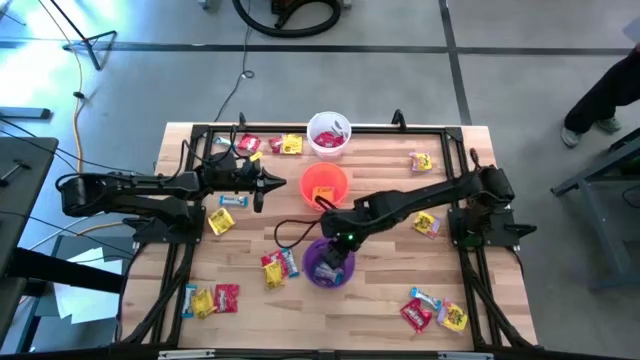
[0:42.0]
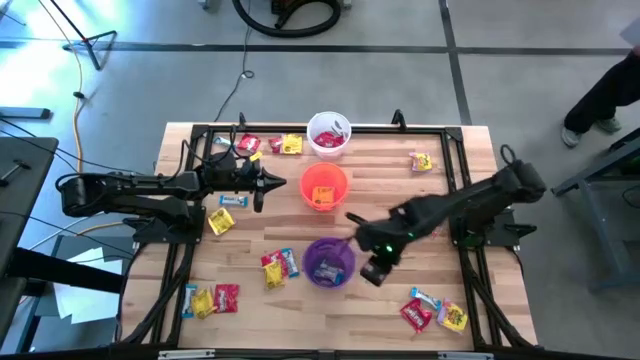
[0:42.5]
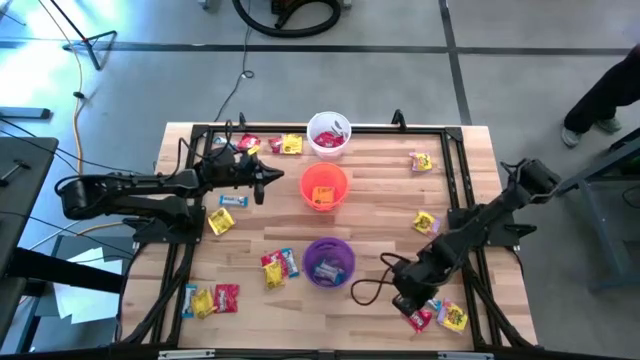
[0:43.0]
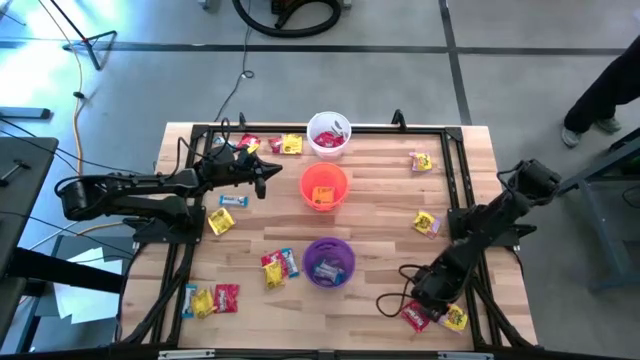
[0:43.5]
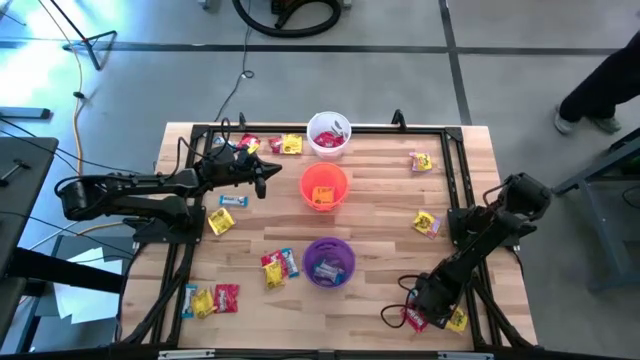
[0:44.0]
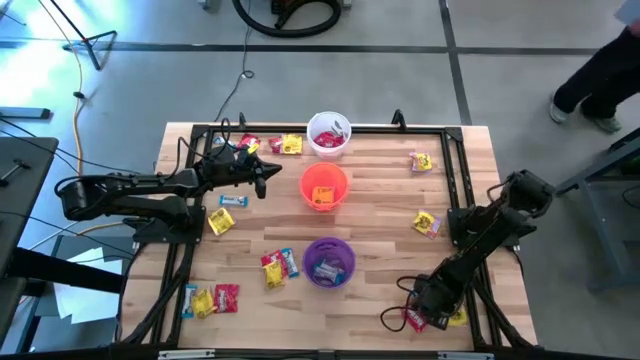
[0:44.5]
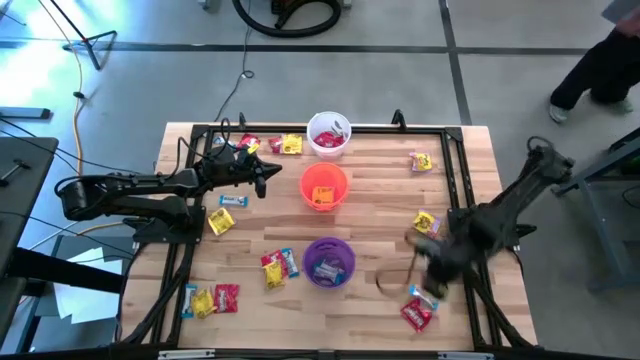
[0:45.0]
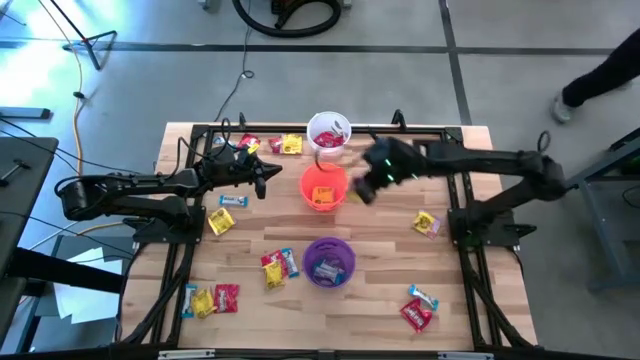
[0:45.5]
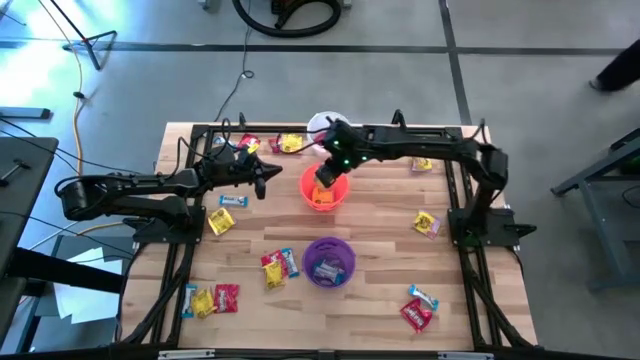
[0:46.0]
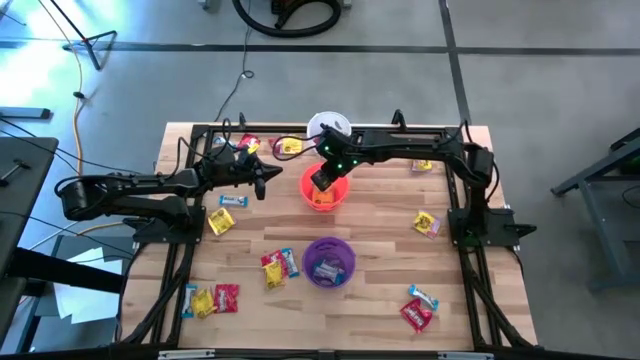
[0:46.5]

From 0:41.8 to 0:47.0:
Task: Sort candy
Put the yellow candy into the orange bucket

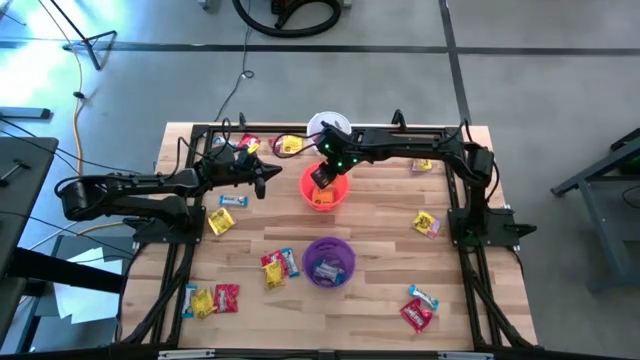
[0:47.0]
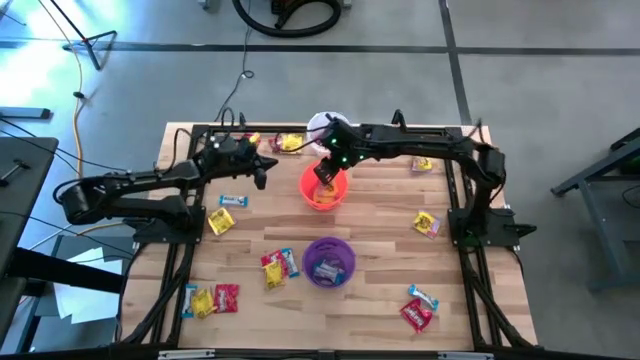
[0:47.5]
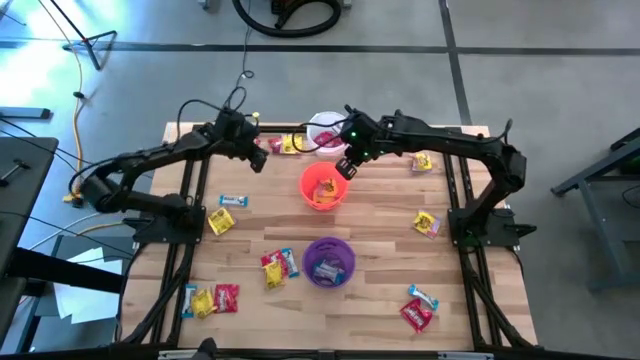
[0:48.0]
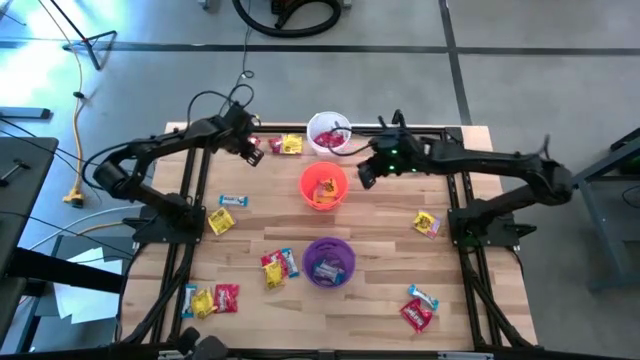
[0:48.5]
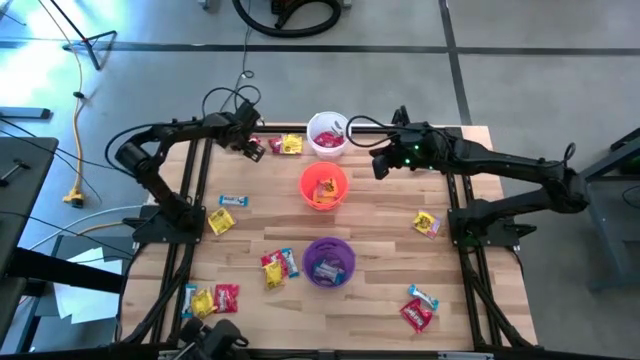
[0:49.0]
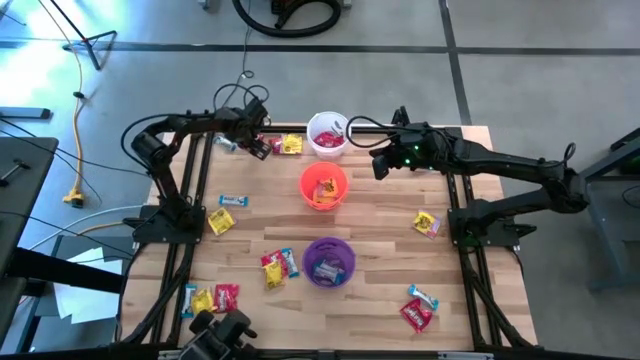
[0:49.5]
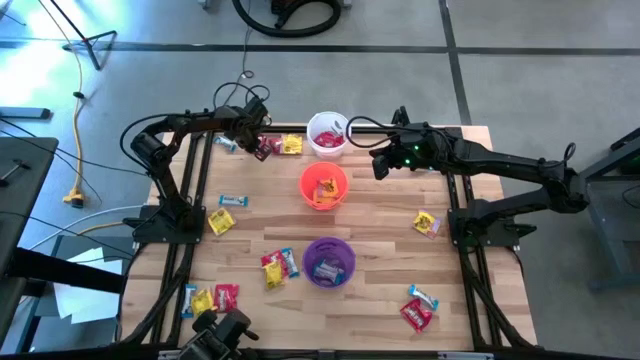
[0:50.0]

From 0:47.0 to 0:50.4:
Put the red candy into the white bucket

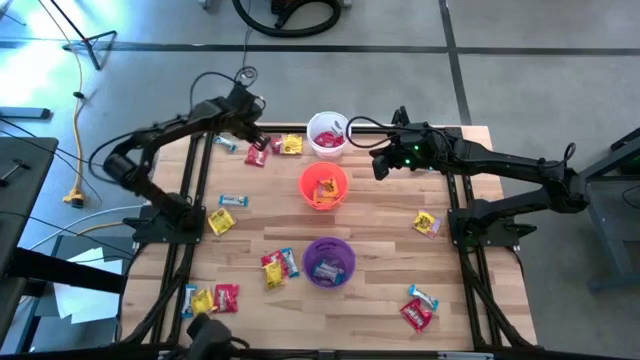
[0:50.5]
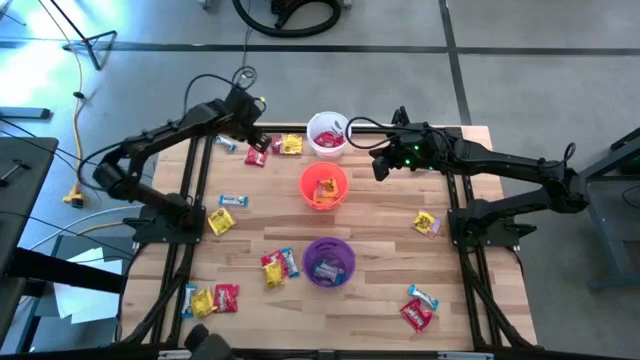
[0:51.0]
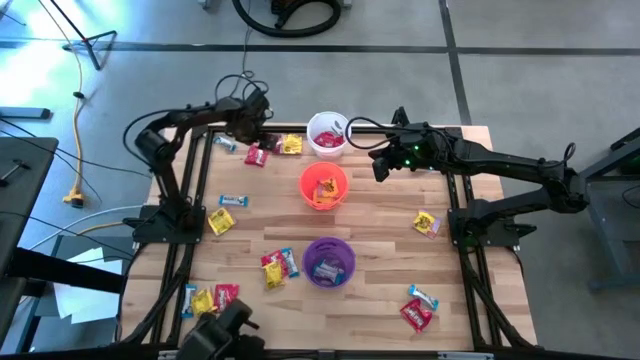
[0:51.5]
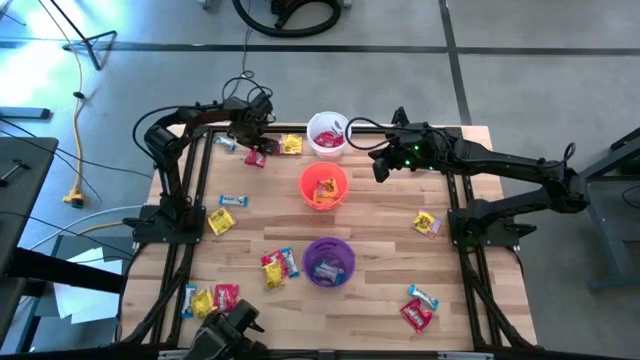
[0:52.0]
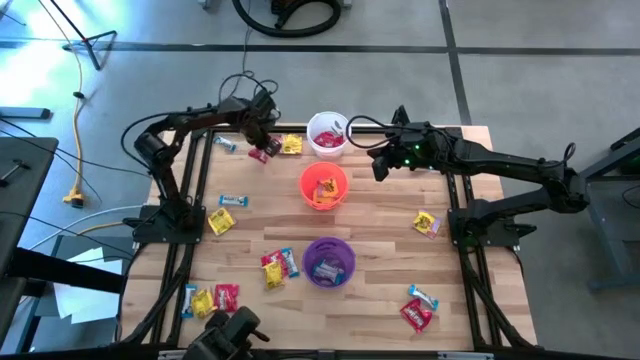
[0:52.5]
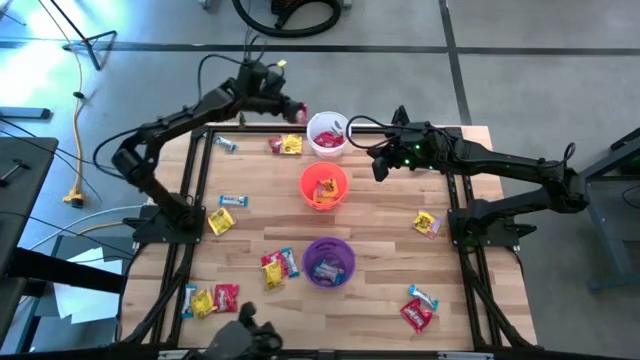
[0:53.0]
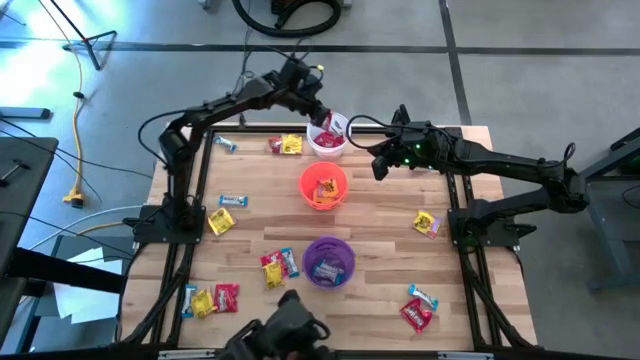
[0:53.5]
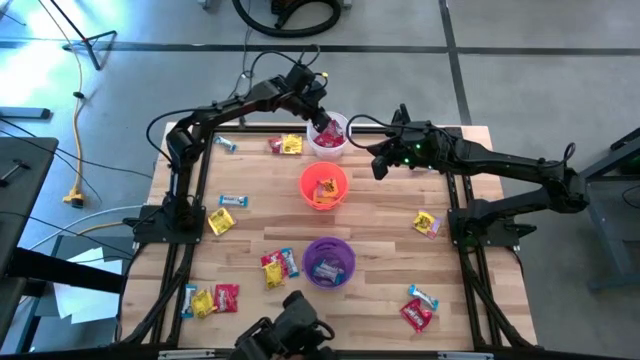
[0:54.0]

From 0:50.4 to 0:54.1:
Put the red chocolate into the white bucket

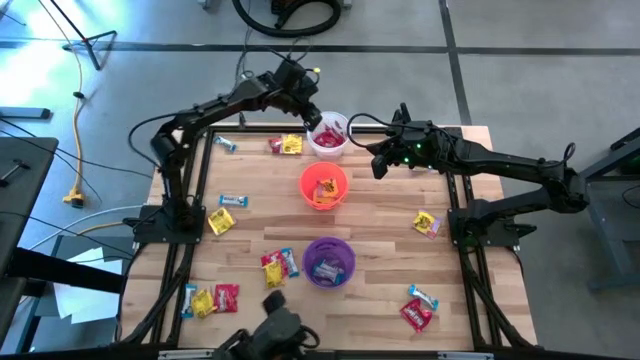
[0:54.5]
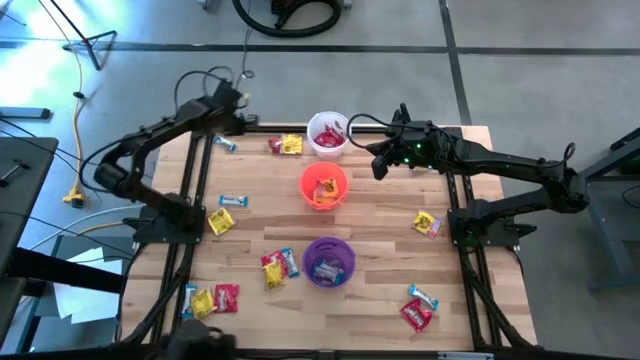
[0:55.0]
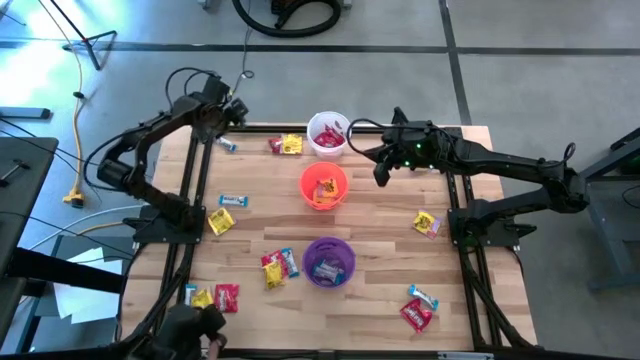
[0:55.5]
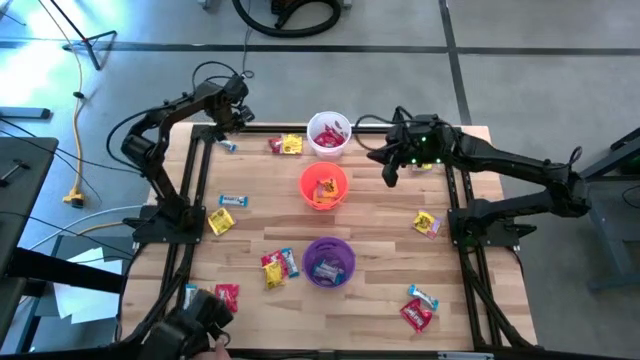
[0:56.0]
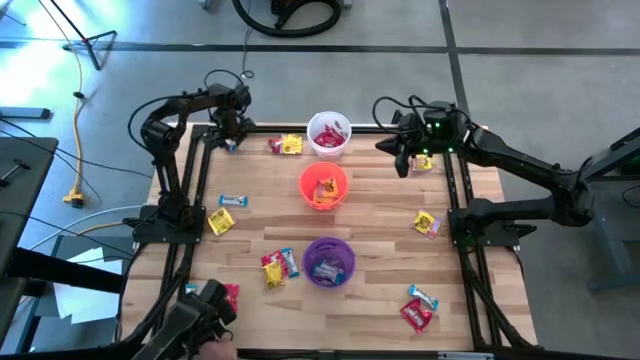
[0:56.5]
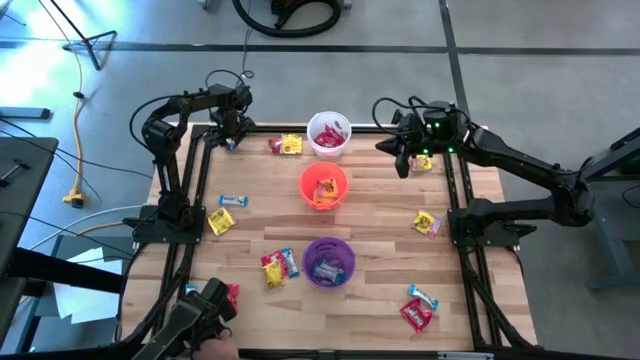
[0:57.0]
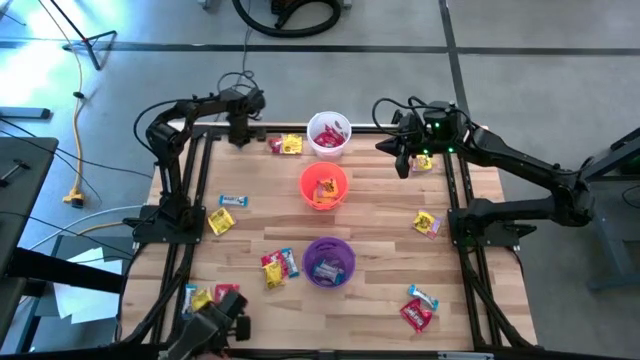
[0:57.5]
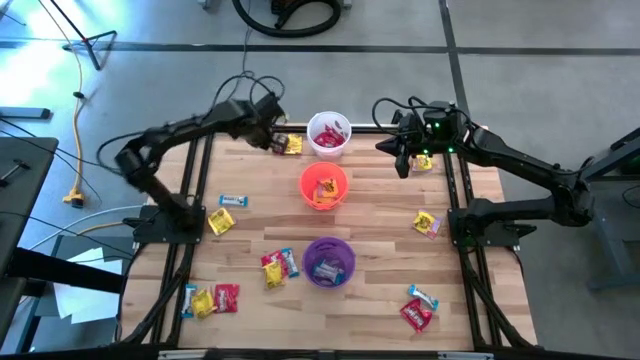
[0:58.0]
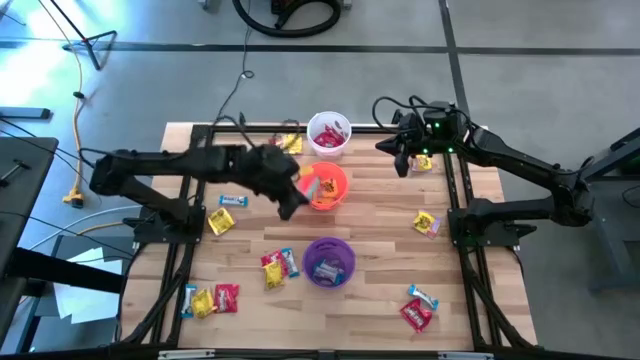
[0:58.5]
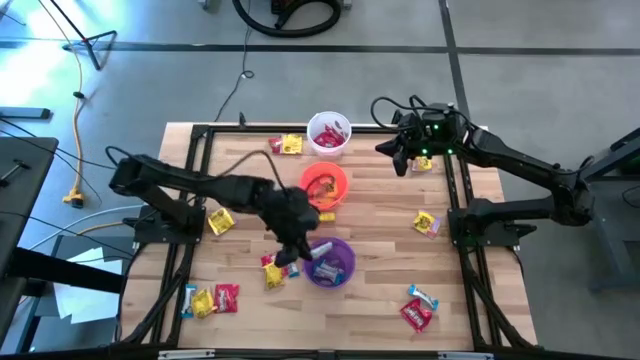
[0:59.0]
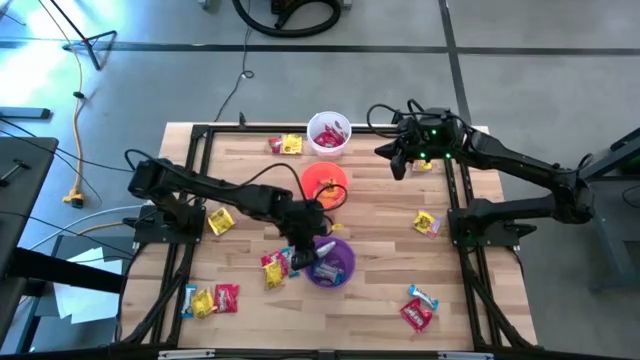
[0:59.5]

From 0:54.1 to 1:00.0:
Put the white chocolate into the violet bucket

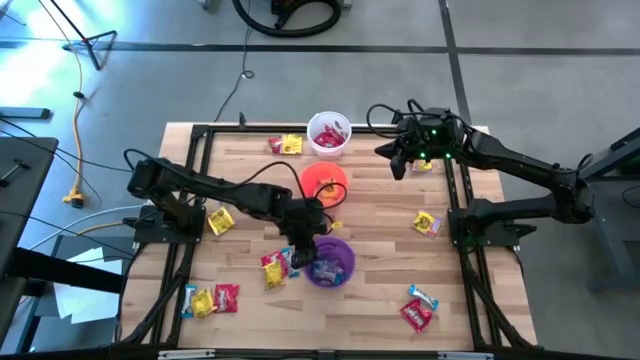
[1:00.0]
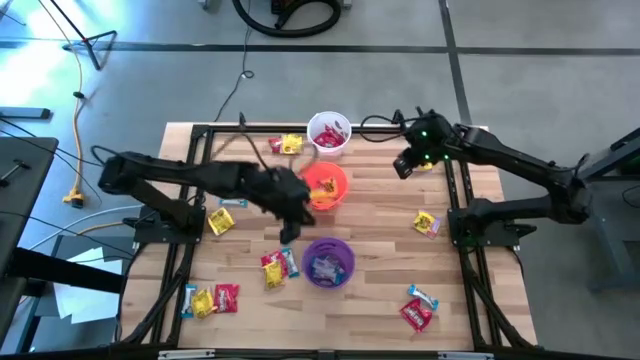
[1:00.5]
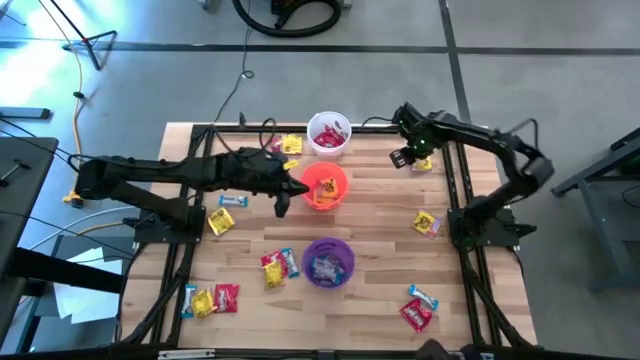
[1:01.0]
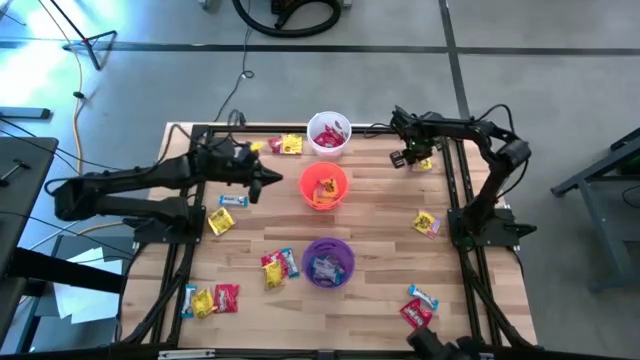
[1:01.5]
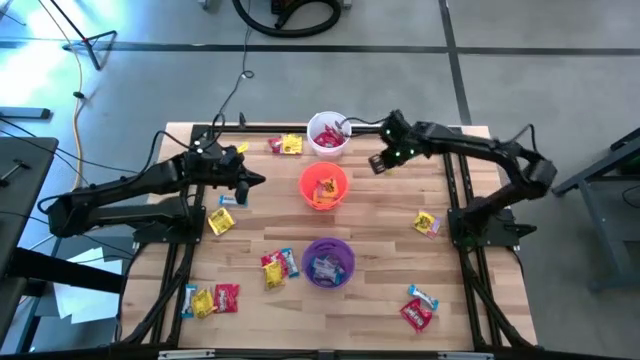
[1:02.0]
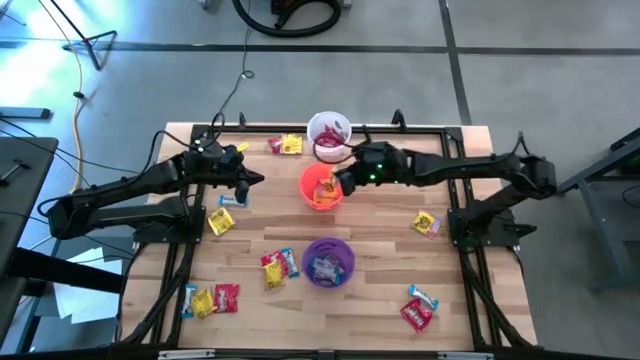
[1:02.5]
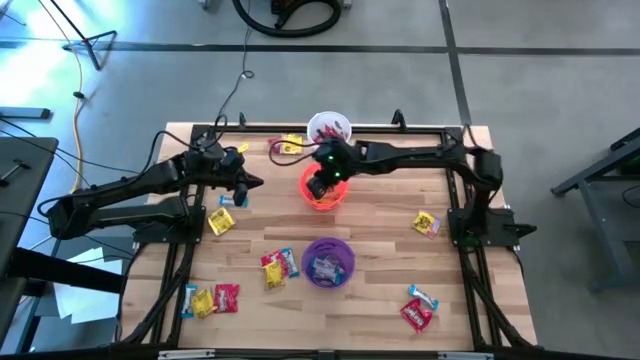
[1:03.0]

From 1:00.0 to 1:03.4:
Put the yellow candy into the orange bucket
